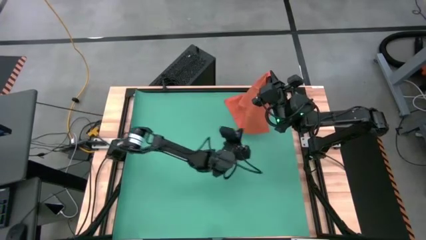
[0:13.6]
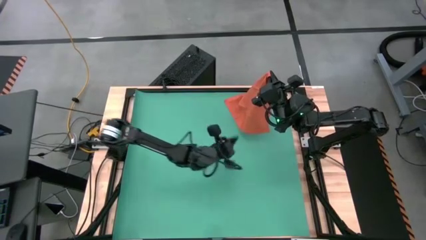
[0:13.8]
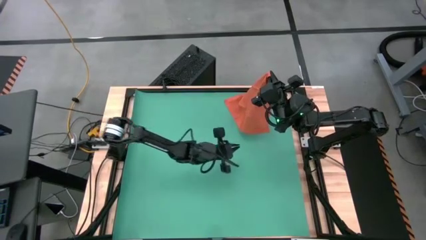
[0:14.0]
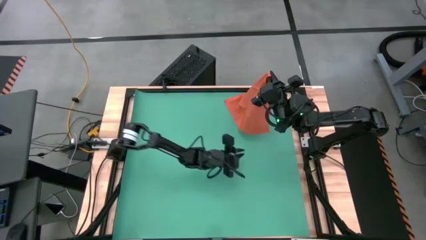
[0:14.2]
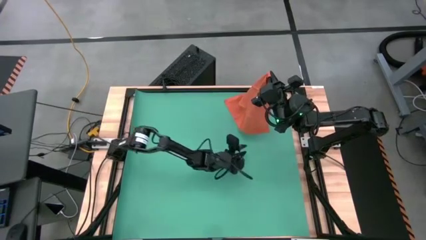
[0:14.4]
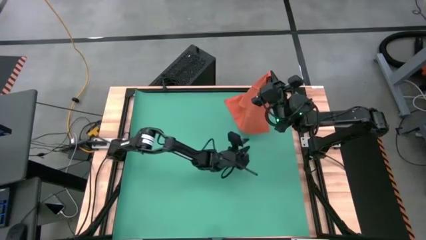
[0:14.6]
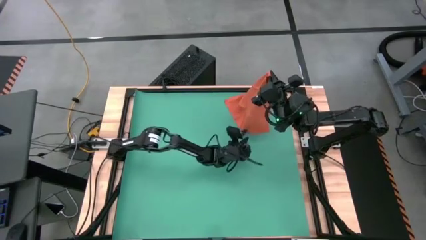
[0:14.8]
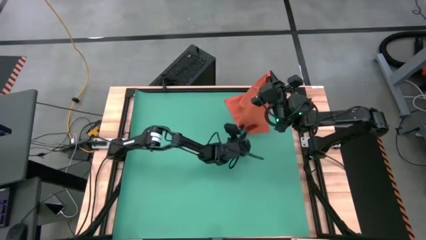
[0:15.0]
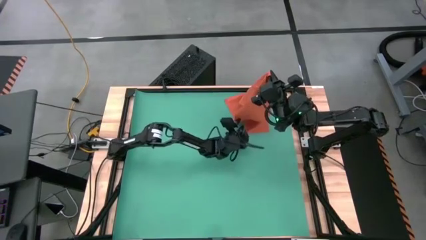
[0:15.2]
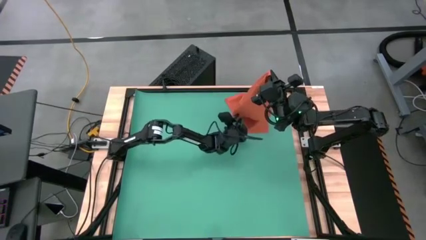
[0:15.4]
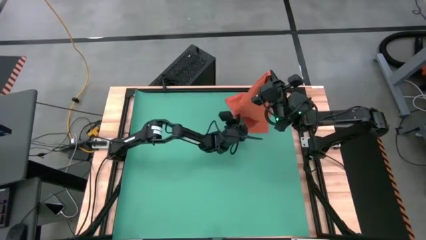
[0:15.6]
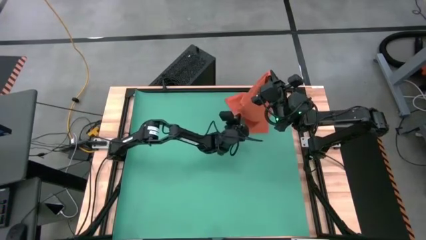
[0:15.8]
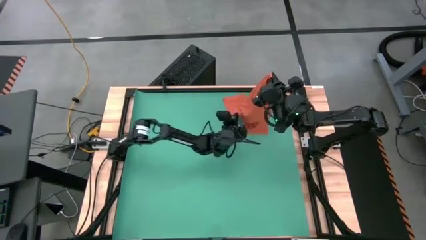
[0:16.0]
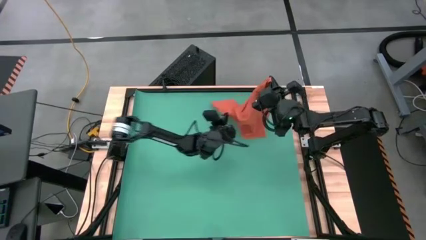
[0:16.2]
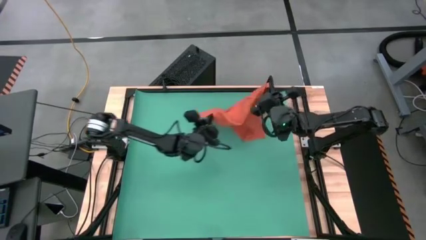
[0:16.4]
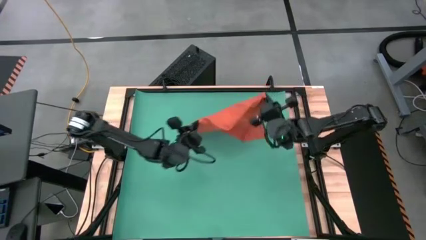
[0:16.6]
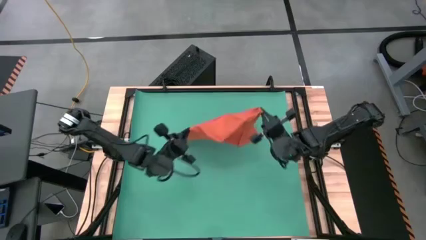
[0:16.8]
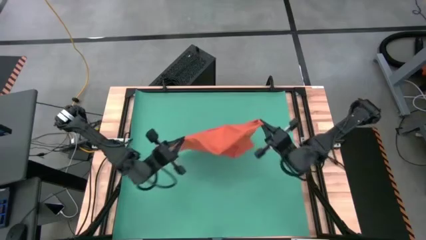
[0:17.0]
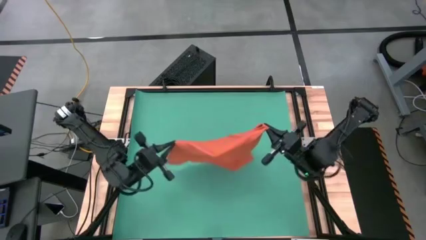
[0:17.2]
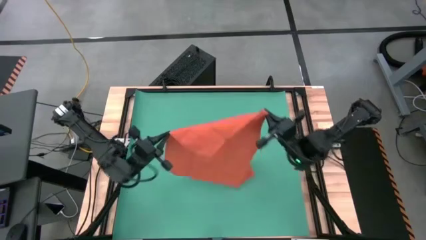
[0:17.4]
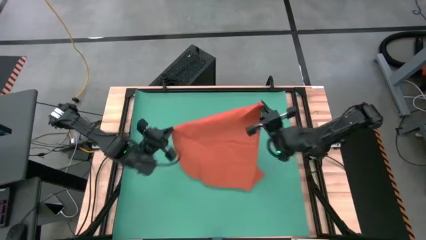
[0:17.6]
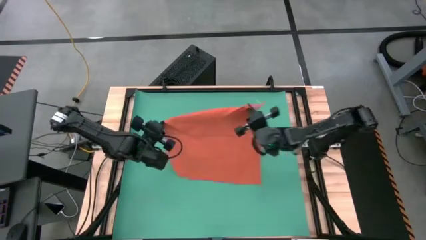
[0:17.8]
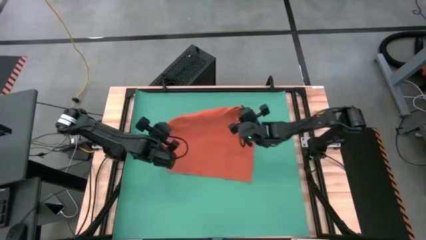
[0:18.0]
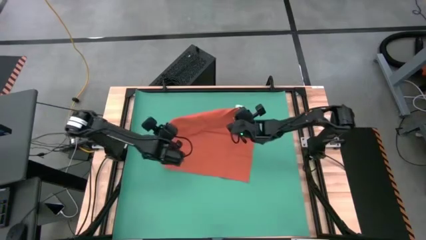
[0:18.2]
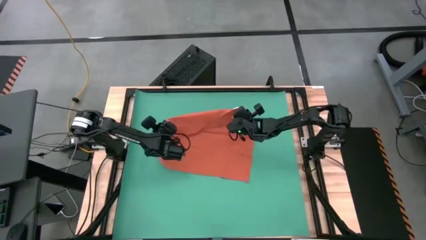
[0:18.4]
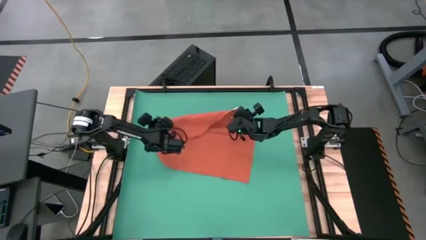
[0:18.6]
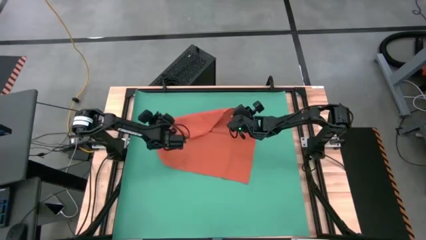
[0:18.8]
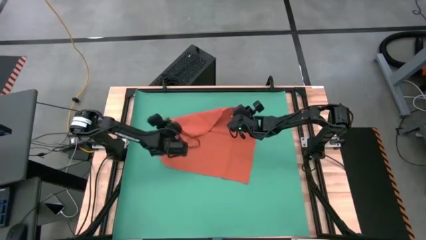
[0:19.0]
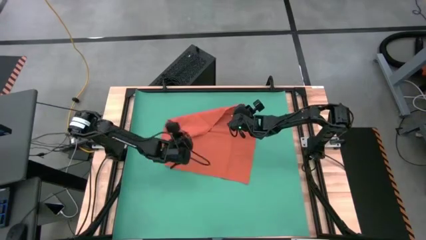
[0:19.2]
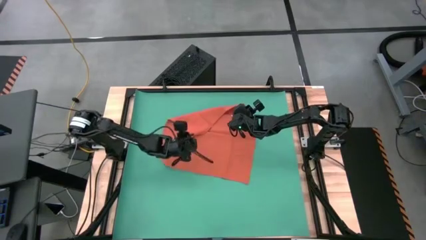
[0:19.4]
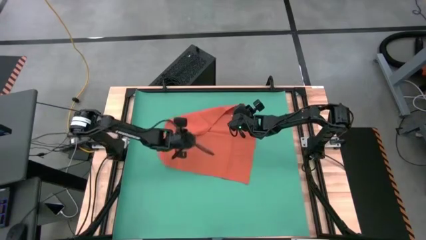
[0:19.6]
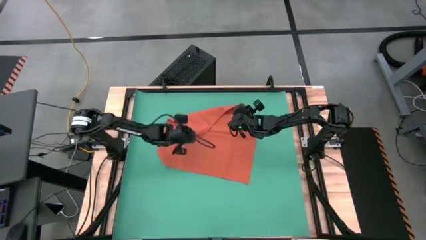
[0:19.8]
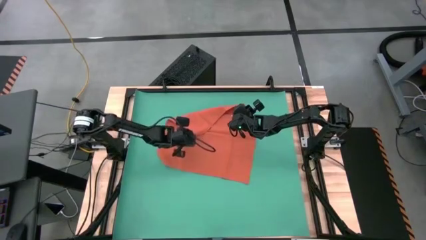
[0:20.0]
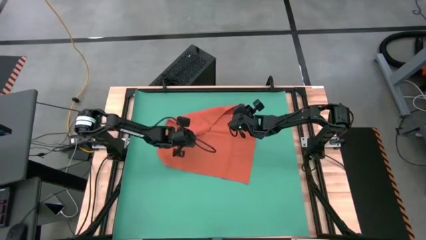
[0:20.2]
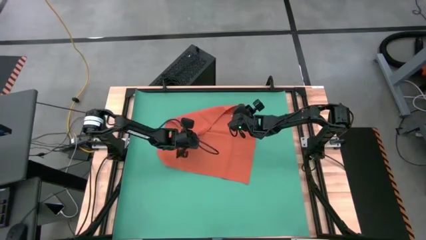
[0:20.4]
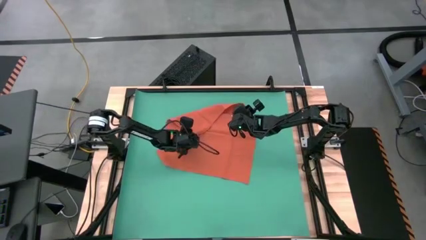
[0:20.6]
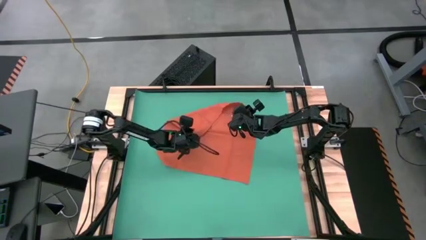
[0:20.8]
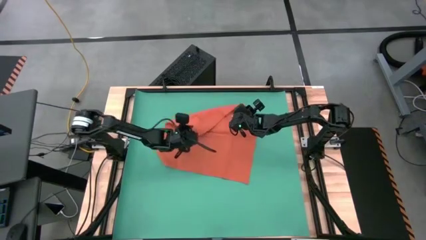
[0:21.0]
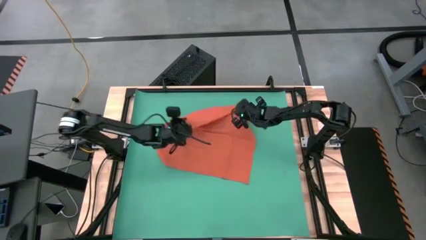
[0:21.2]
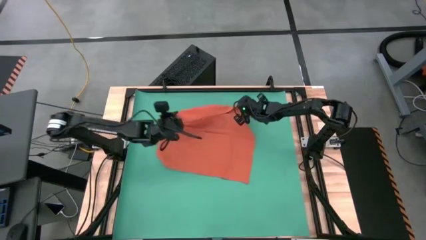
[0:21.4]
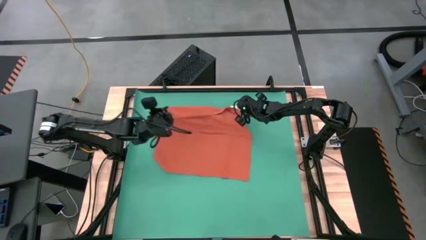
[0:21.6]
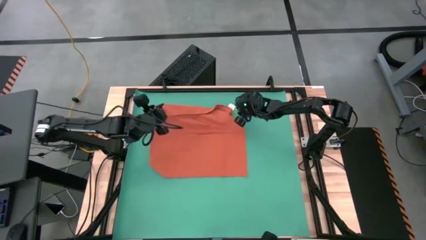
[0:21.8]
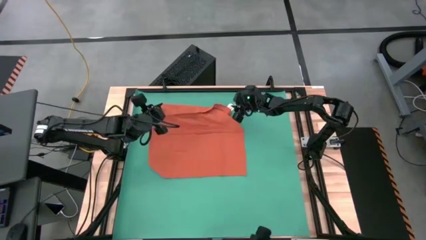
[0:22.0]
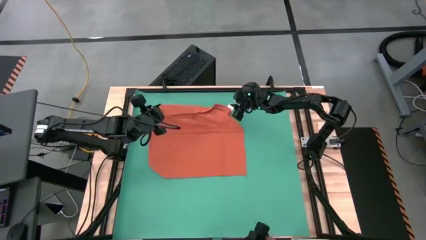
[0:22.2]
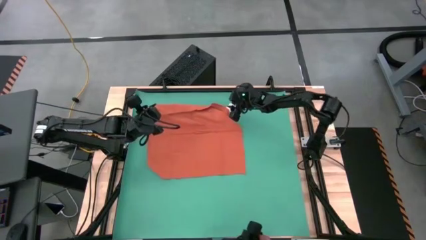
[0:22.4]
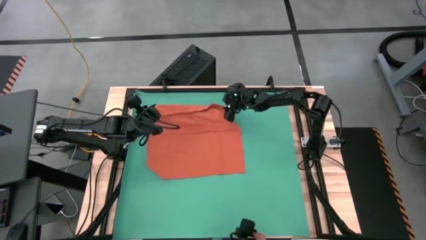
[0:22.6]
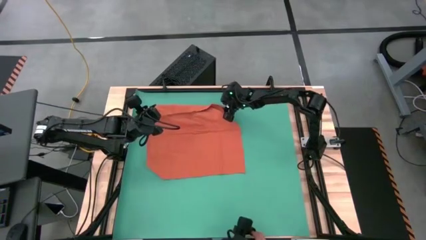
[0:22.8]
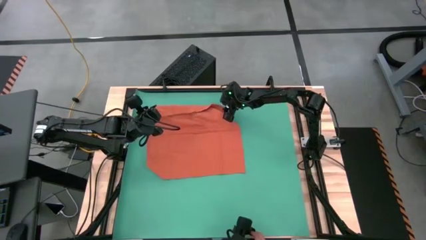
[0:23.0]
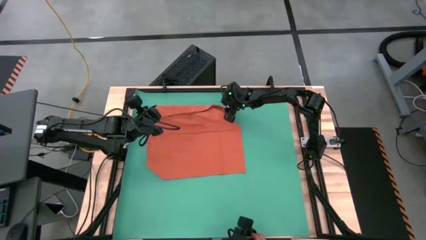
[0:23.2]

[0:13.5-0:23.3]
Task: Roll towel
Fold the orange towel

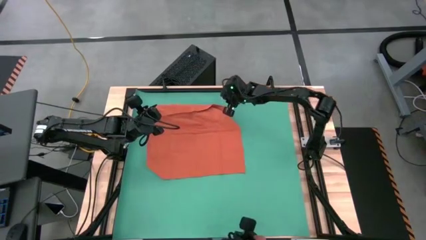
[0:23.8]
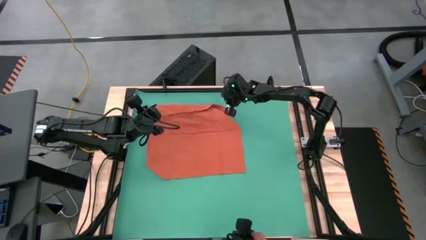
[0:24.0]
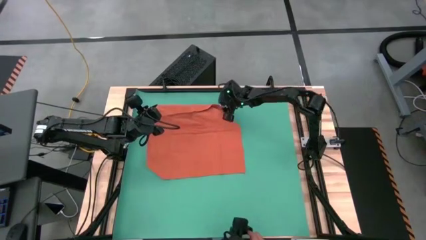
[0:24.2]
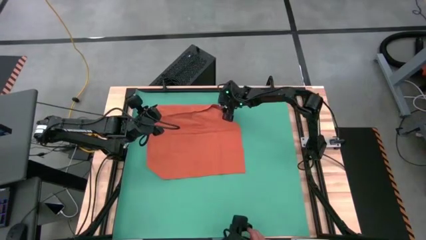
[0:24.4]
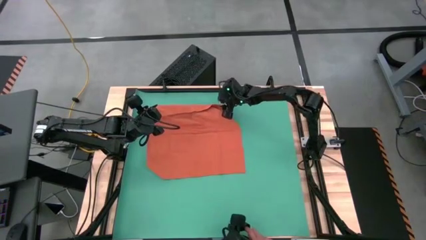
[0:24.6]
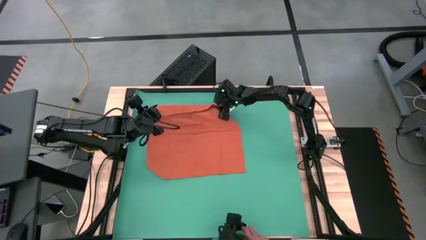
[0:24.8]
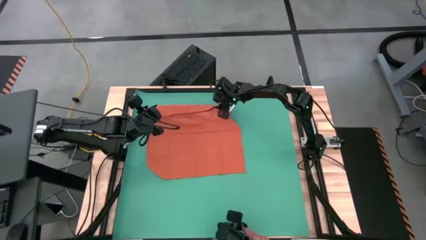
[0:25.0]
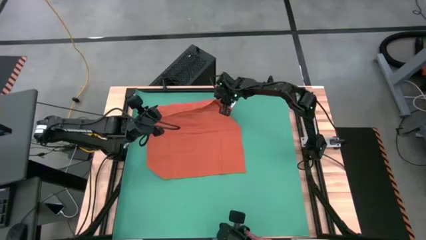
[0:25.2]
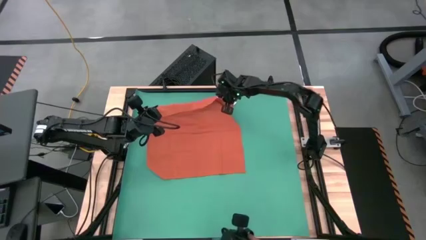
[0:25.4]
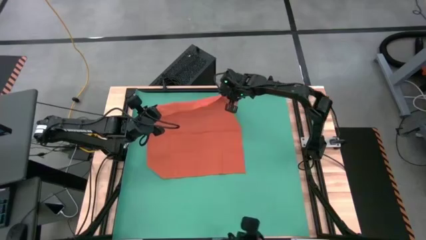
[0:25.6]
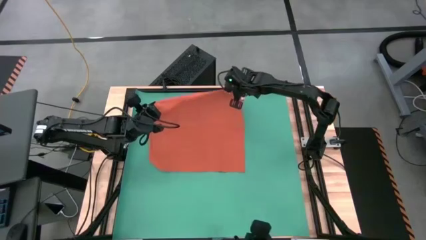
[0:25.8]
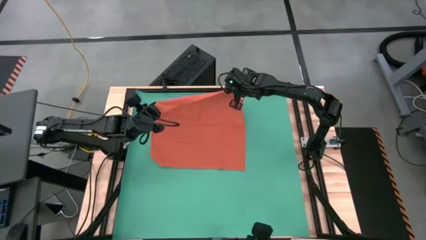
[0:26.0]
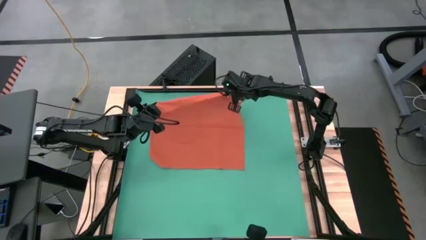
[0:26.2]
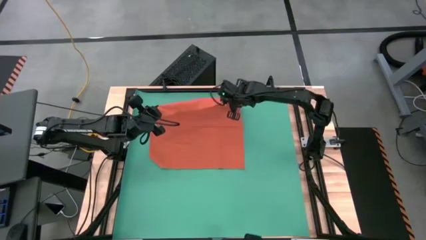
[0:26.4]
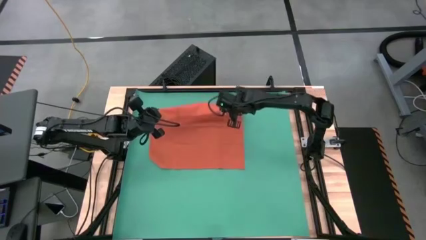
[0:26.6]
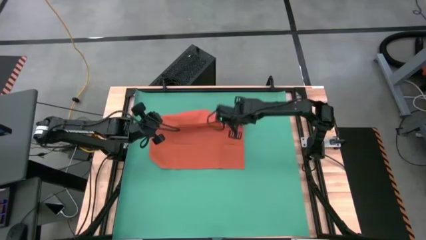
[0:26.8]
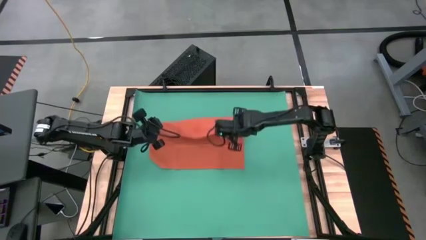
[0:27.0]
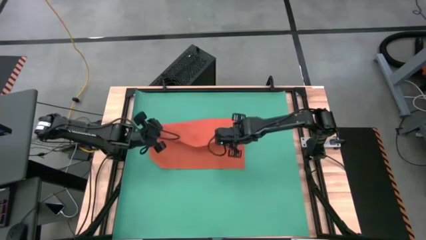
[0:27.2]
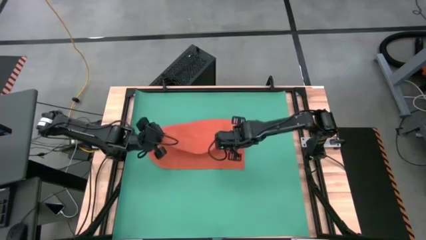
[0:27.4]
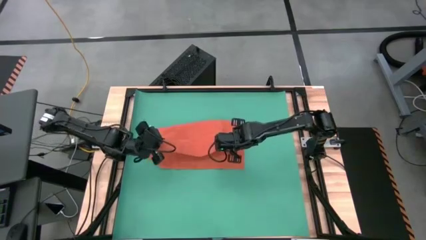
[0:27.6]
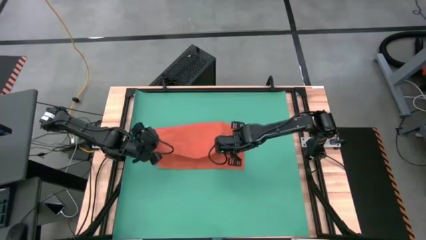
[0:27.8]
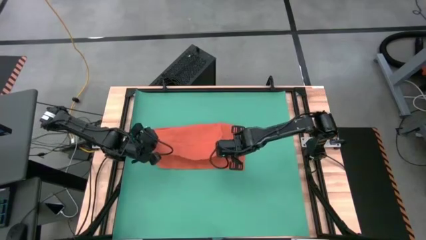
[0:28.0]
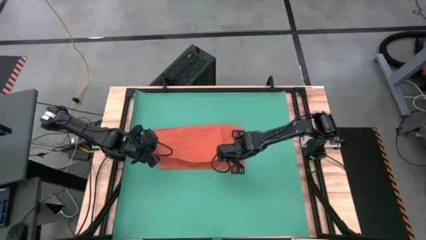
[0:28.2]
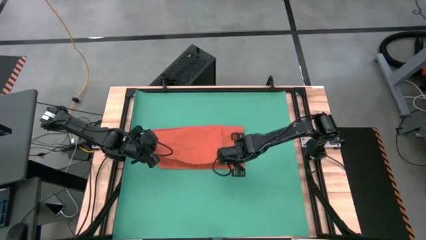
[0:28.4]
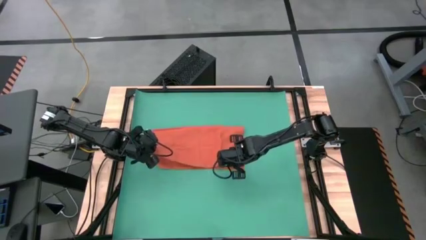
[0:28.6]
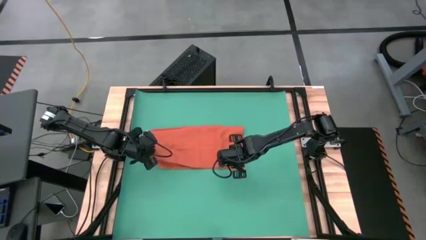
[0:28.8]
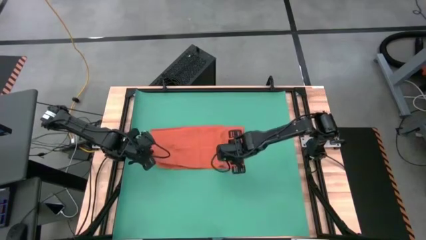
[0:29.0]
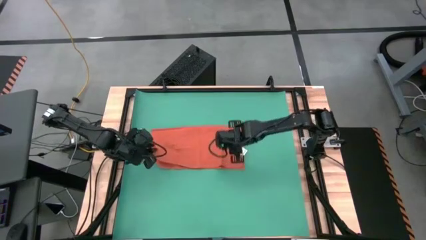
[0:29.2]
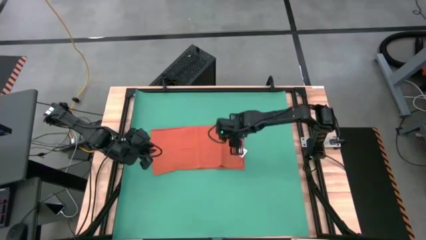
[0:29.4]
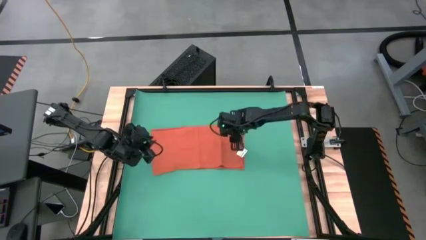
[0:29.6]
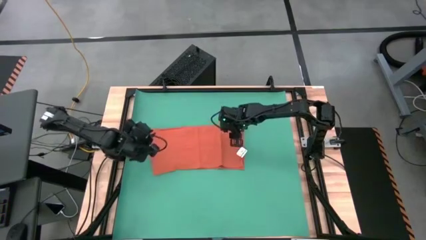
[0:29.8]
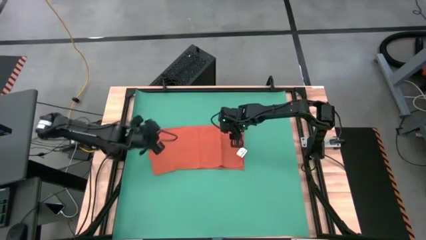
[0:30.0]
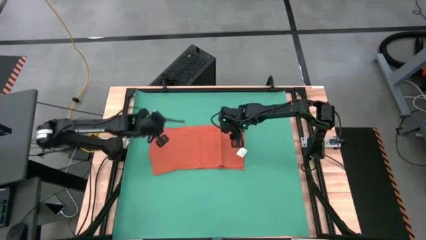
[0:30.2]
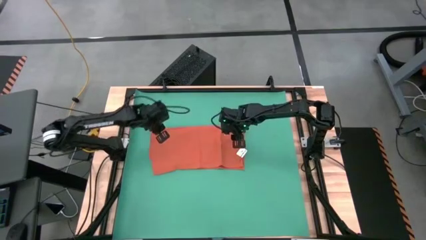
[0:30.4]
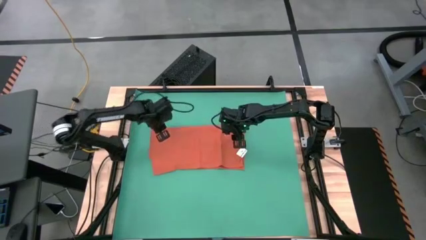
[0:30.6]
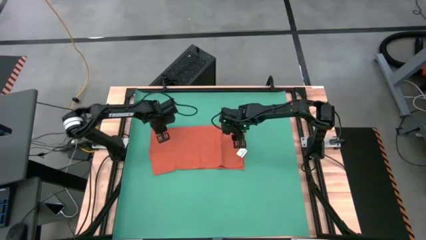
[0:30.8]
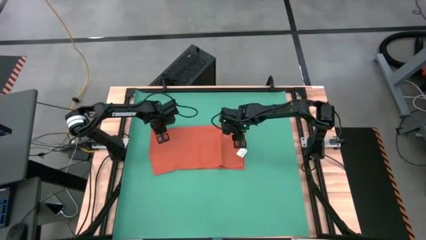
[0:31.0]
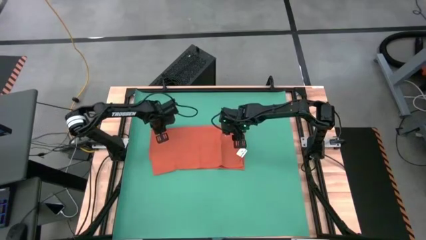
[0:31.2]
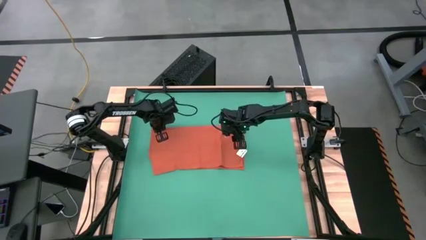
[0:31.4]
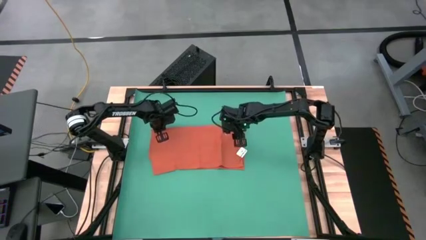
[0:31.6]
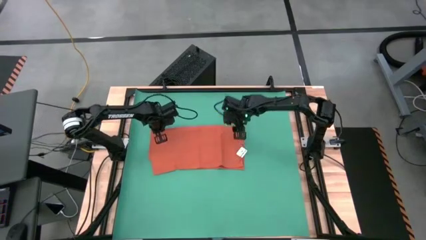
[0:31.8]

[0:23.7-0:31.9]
Fold the orange towel
